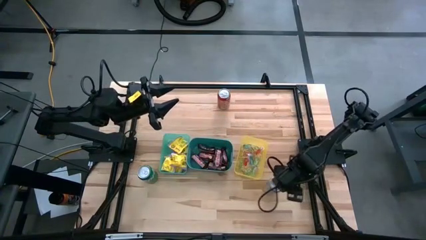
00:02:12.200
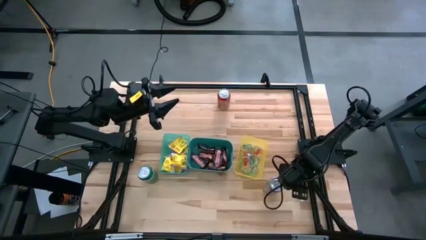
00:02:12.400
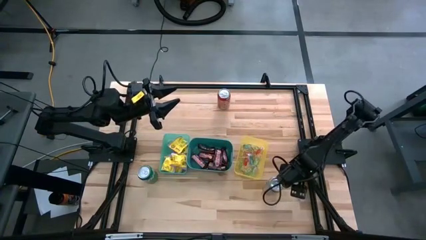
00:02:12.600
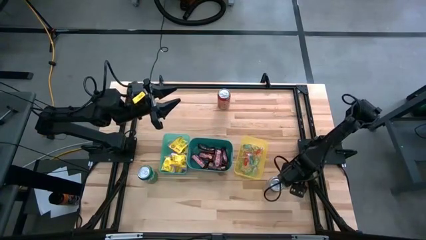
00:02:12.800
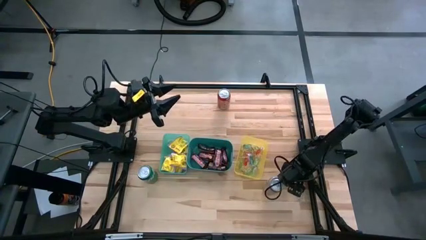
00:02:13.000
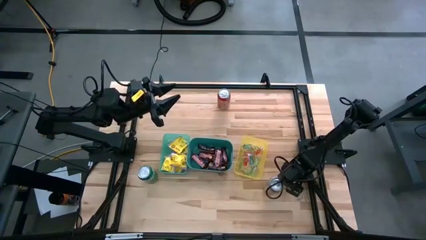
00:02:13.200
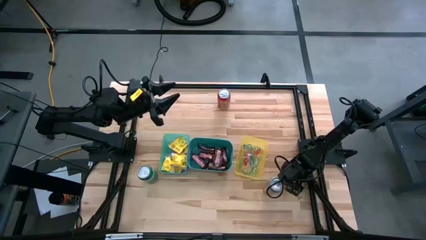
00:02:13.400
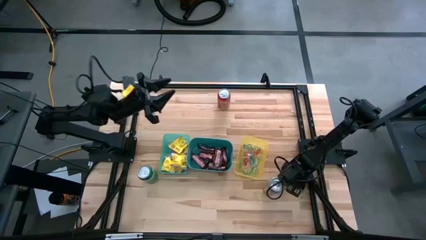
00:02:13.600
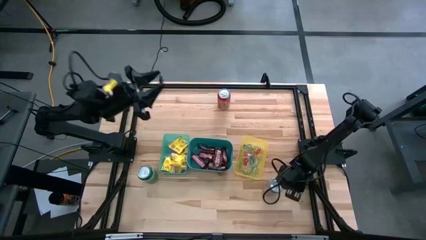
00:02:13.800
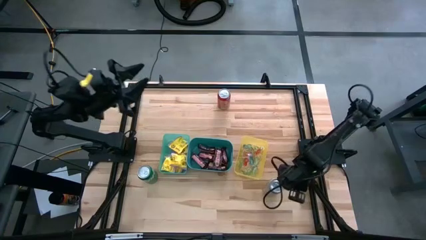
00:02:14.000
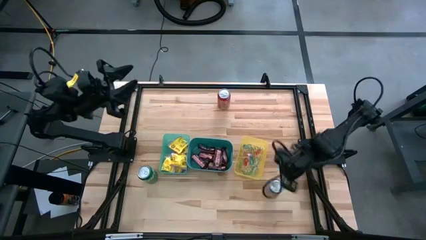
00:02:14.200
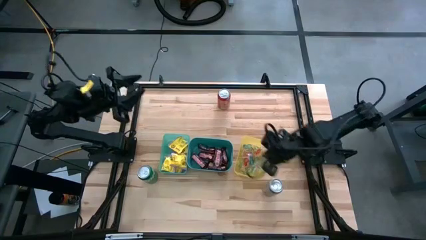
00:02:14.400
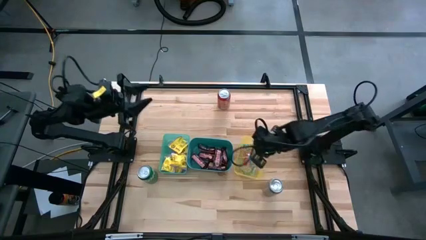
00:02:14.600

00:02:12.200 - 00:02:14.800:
Task: Sort candy
Put the green gummy into the yellow bin

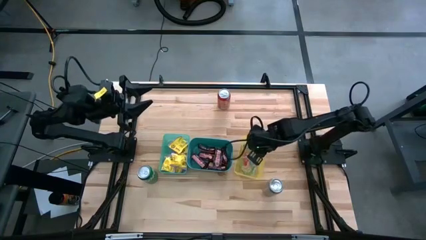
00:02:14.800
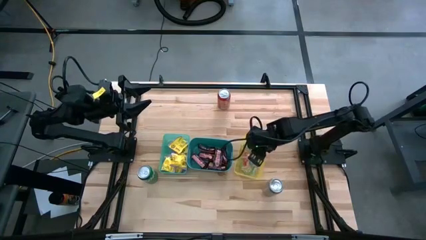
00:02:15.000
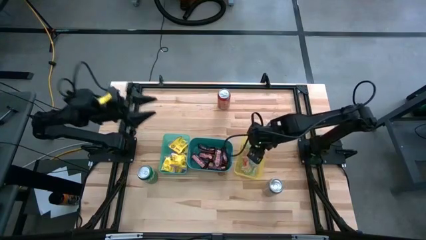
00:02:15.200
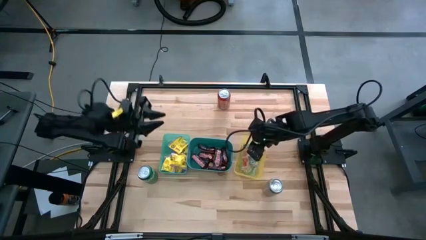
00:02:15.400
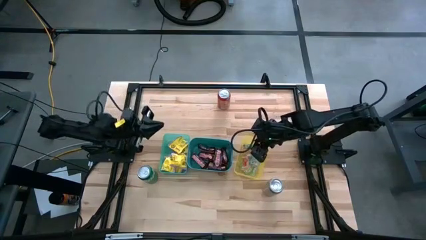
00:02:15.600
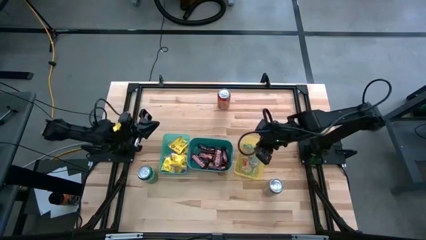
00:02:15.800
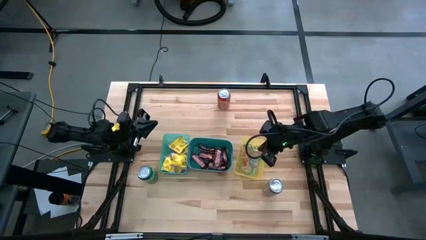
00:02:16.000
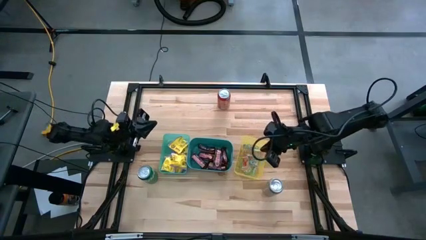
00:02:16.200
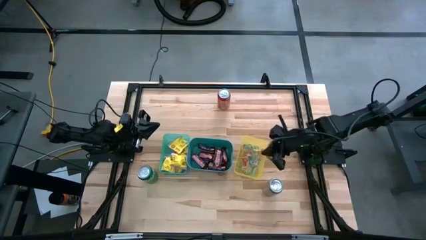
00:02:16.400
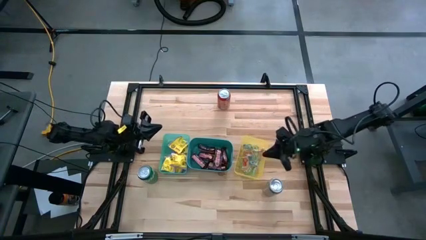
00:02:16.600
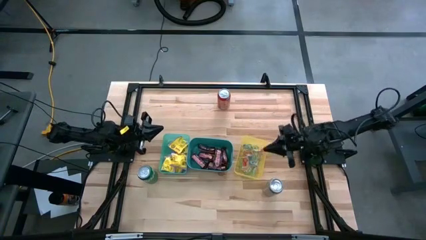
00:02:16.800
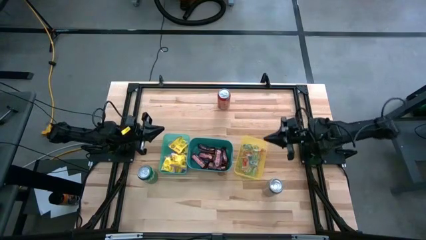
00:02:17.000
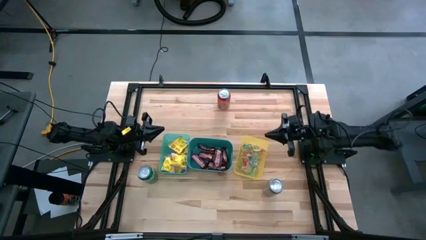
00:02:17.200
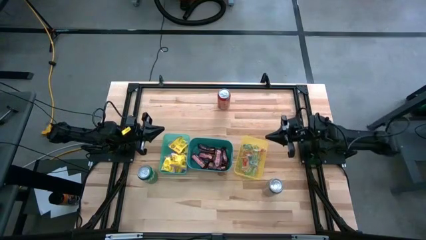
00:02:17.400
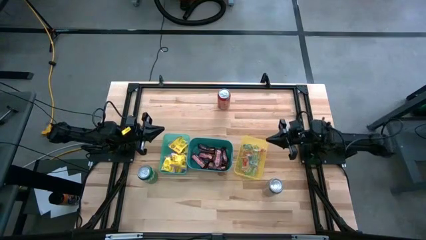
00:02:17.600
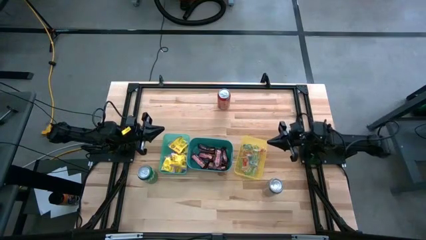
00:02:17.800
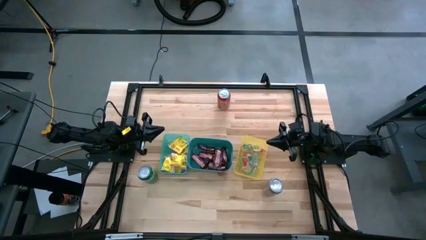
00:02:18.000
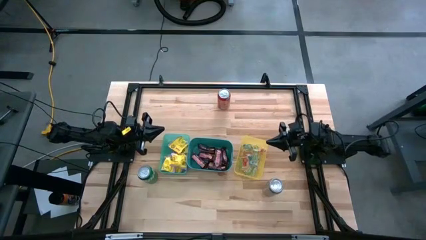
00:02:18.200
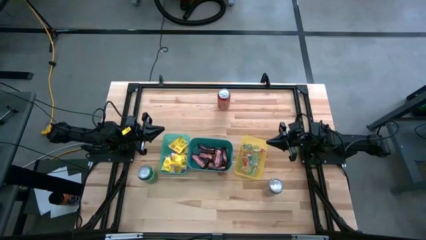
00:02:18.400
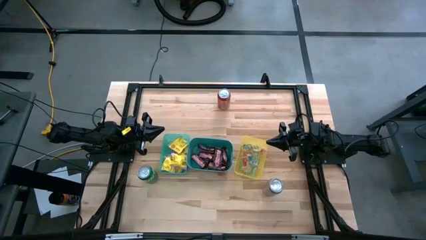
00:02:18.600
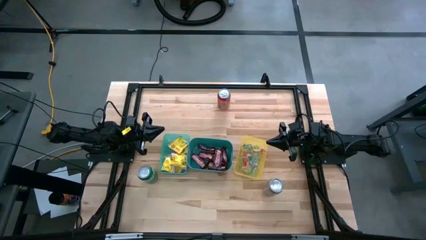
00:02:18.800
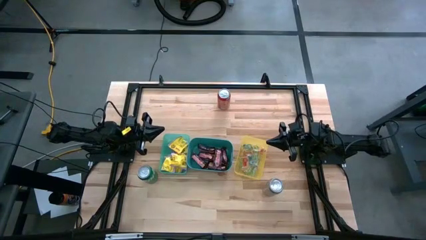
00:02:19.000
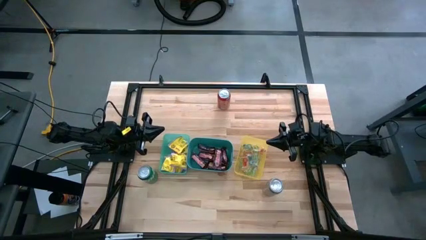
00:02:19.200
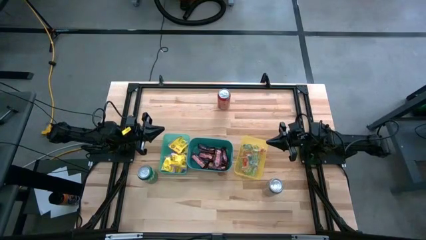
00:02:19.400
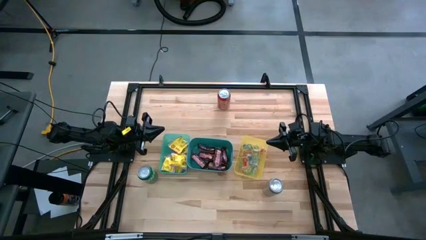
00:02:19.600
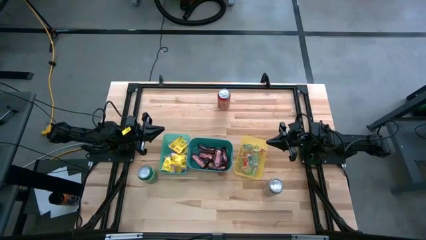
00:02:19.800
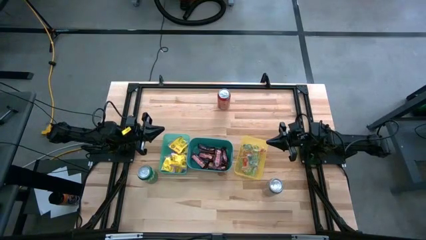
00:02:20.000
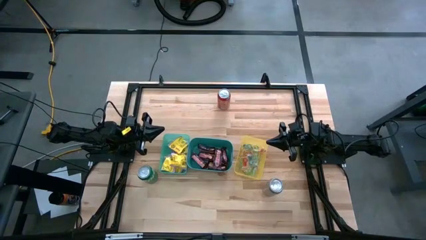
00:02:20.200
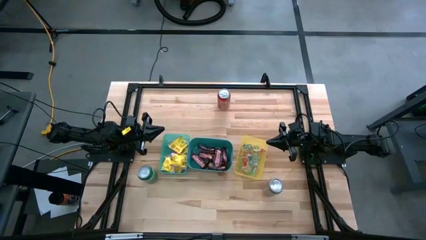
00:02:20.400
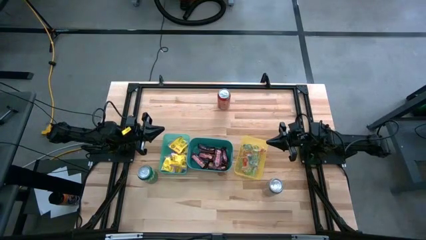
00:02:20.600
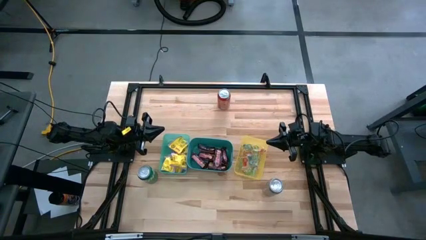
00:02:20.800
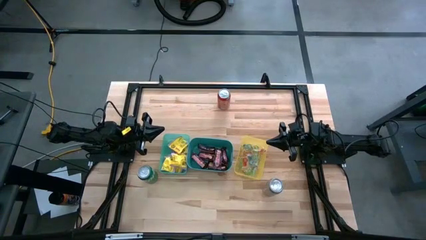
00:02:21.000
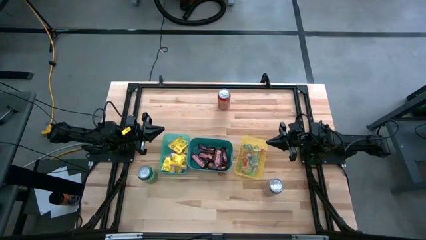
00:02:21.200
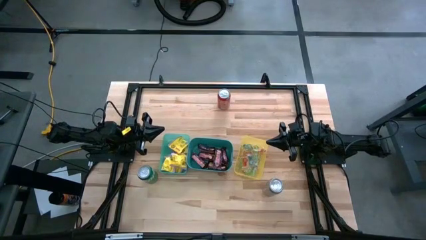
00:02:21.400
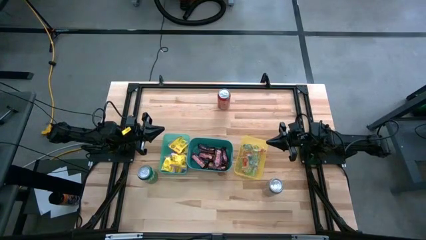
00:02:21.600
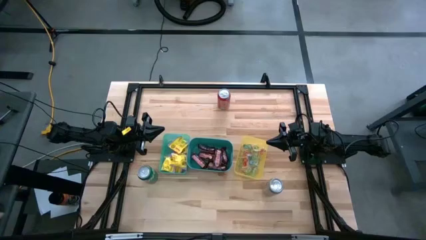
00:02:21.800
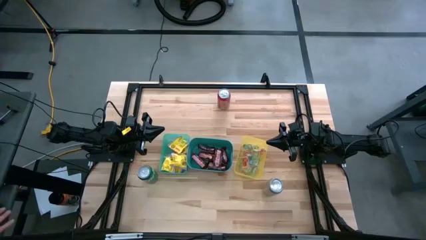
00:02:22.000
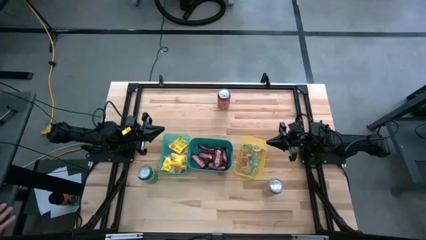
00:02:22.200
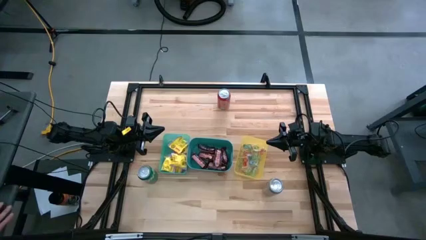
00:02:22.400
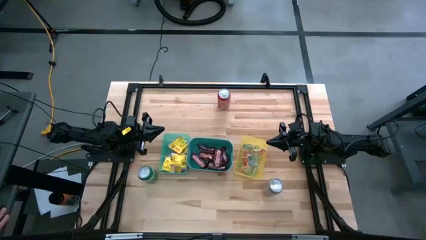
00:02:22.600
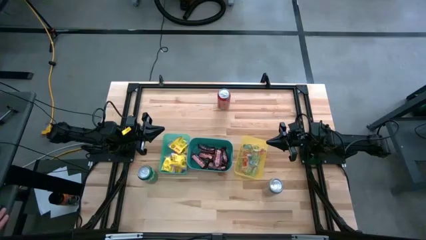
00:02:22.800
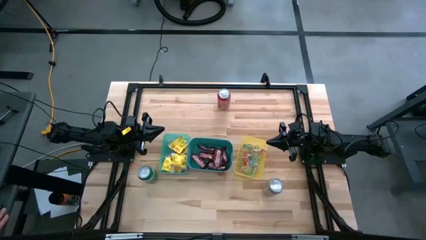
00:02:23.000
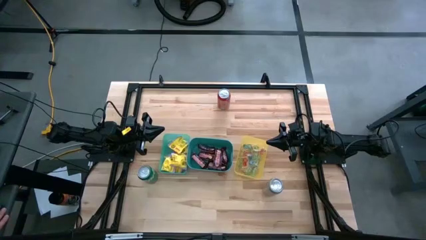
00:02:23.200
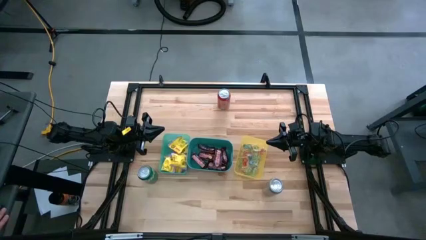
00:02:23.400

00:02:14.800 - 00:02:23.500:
Return to Home Position

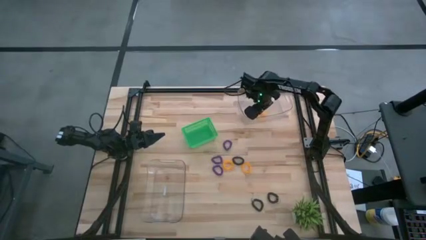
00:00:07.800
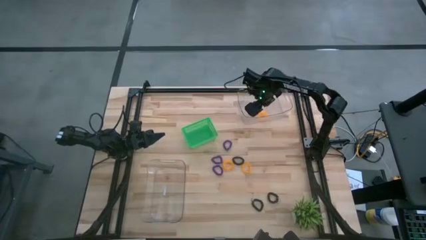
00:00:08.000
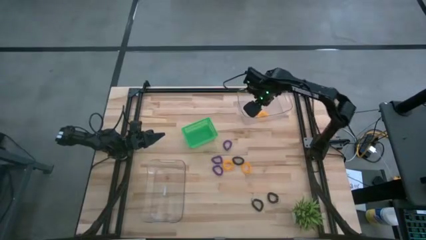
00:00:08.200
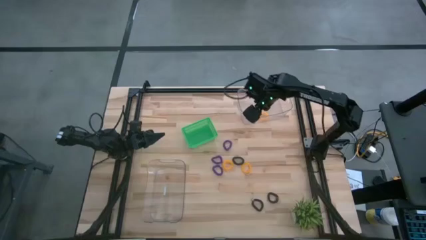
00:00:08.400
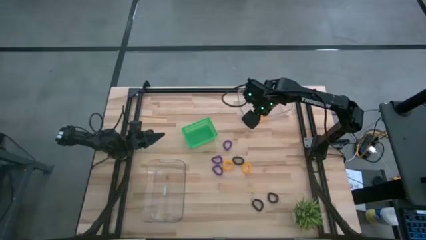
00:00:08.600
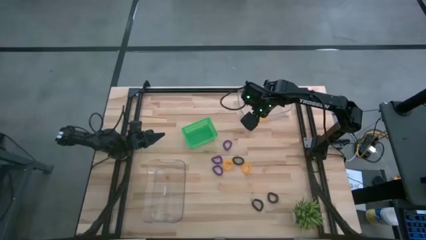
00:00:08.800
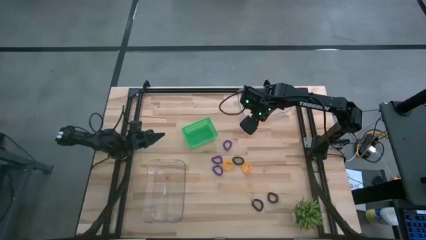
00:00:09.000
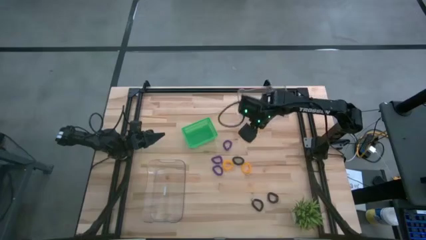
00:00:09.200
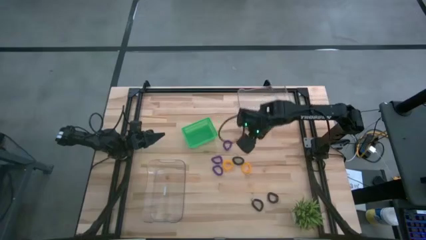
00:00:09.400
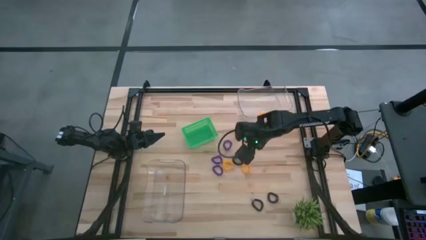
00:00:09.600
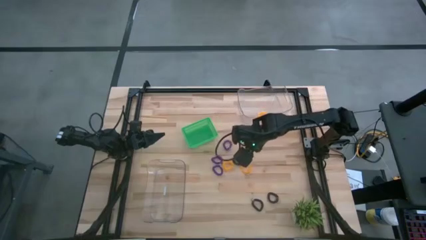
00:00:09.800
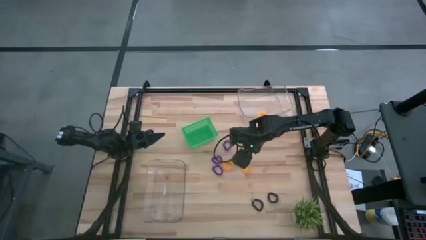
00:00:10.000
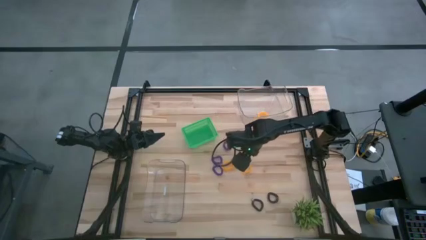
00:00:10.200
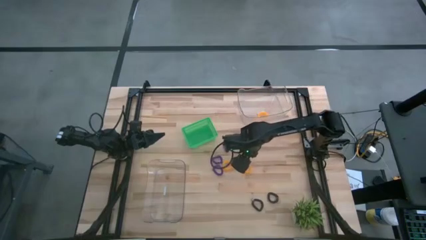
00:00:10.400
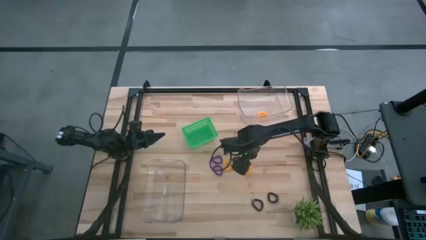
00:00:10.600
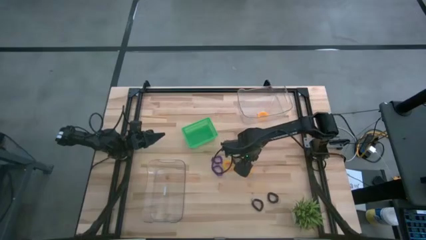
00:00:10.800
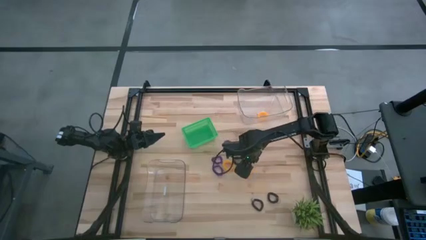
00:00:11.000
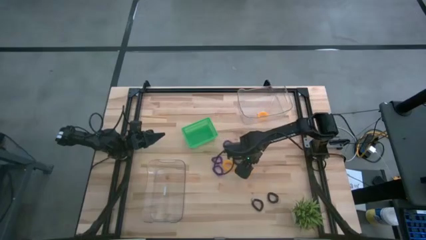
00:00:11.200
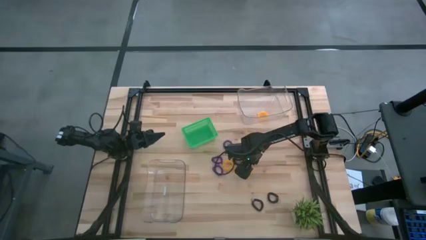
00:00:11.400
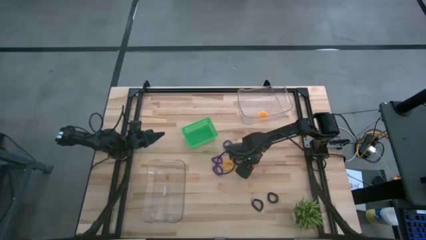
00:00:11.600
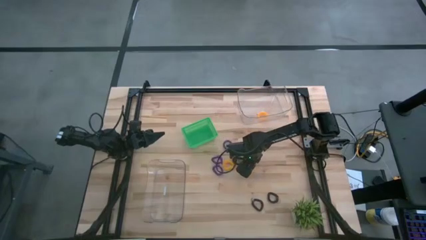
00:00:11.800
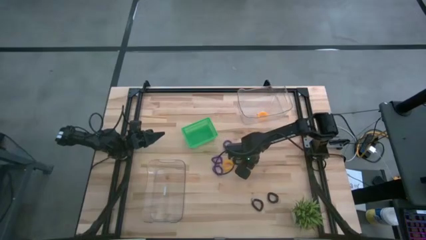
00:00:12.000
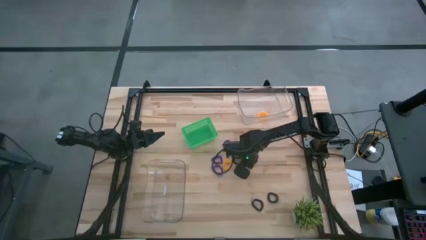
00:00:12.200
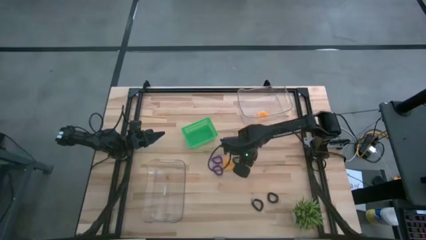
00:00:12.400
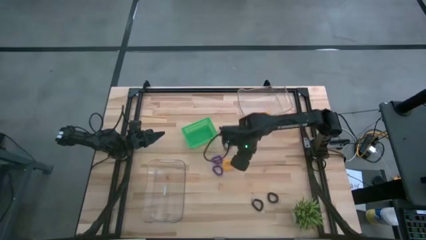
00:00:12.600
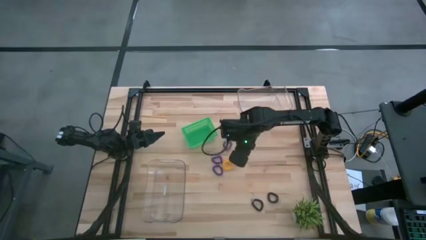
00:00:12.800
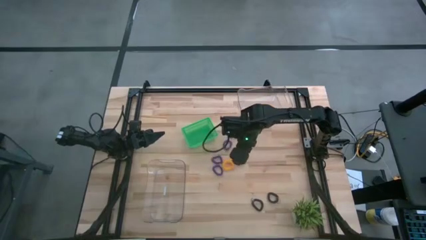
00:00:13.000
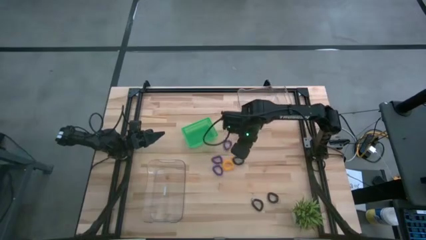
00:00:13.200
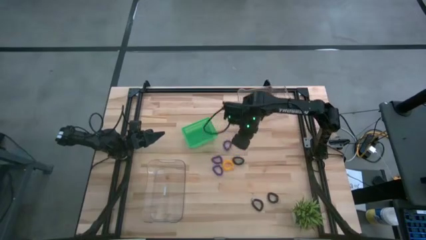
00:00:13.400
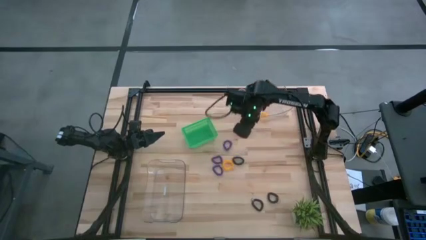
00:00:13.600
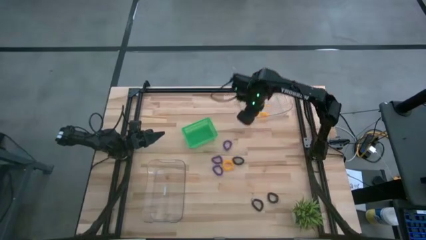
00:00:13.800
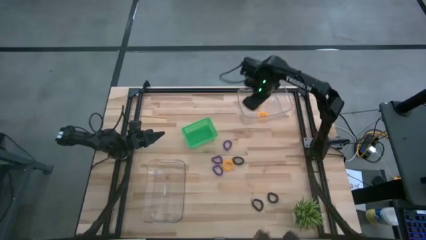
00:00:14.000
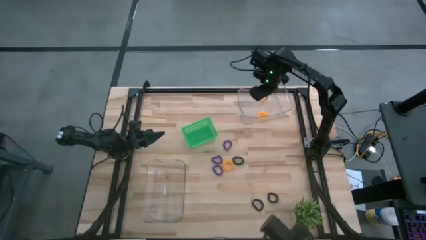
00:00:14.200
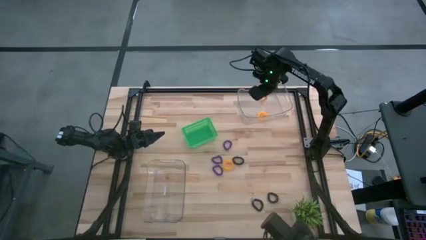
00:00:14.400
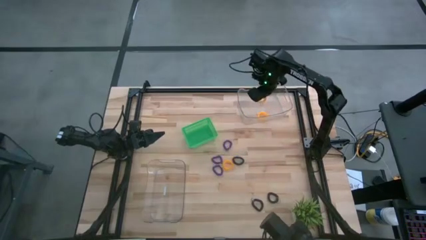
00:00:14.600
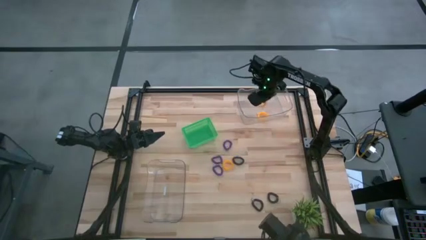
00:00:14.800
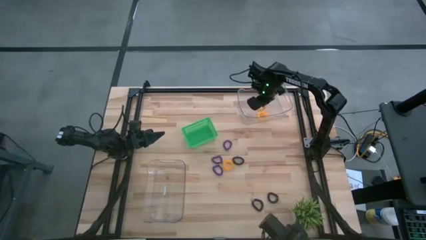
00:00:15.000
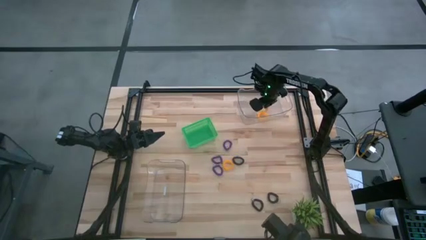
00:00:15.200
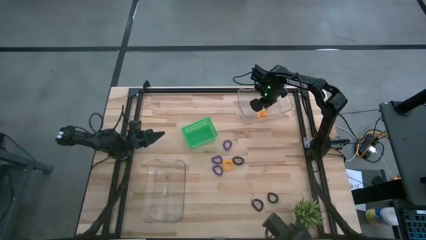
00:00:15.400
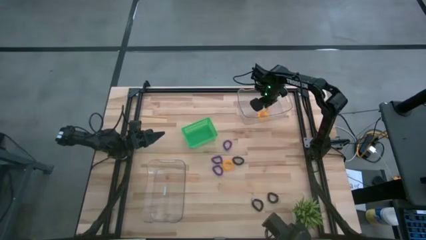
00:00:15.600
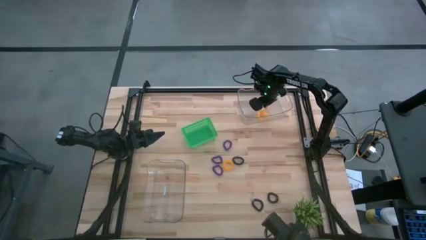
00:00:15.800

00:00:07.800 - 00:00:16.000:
Task: Sort spring keychains
Put the right yellow spring keychain into the top transparent bin
